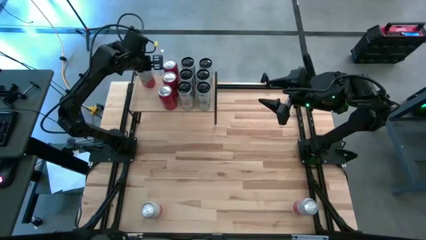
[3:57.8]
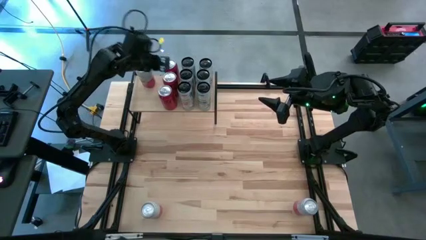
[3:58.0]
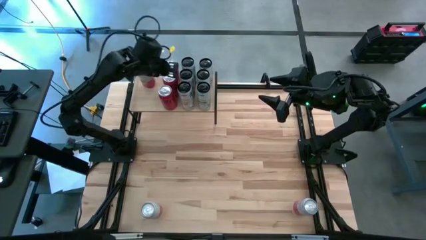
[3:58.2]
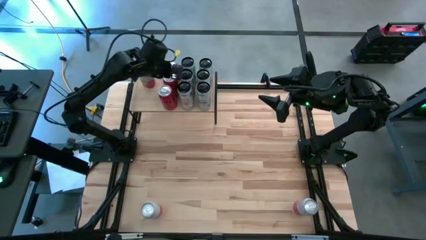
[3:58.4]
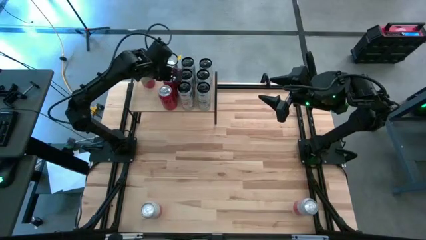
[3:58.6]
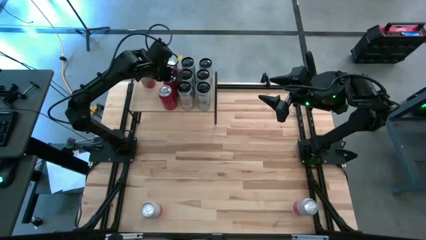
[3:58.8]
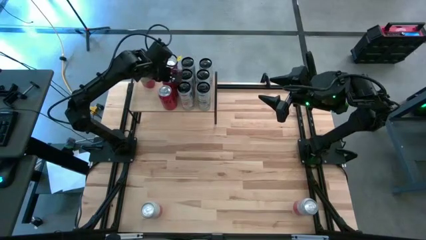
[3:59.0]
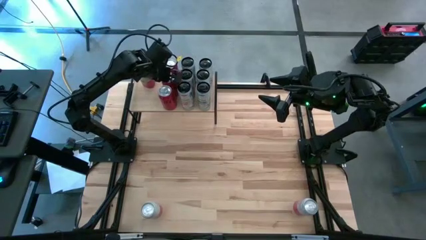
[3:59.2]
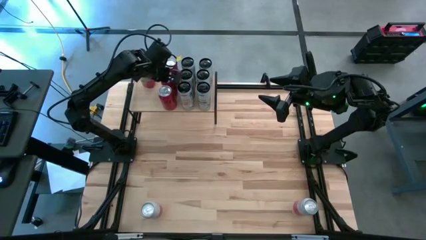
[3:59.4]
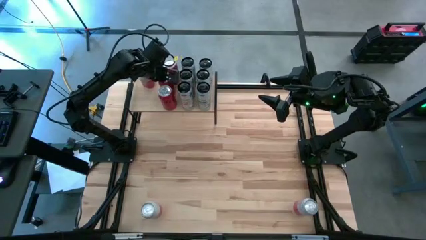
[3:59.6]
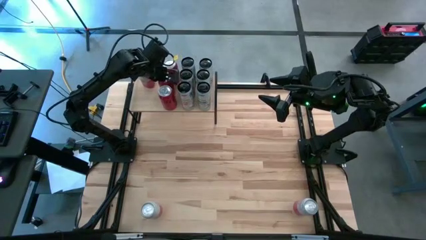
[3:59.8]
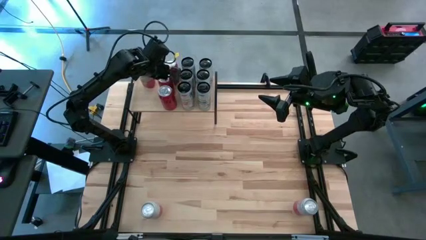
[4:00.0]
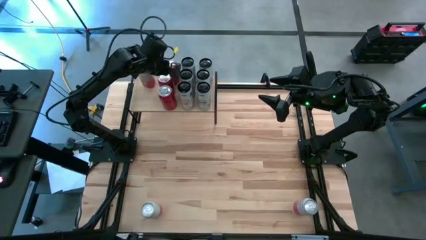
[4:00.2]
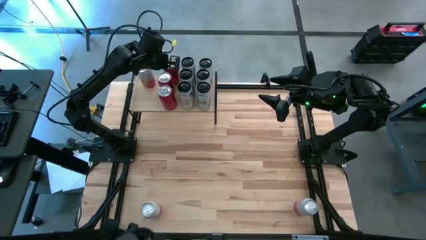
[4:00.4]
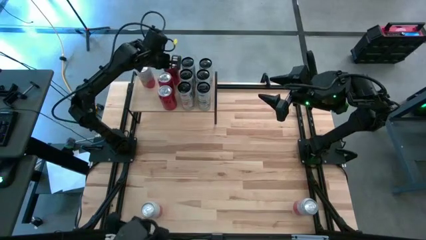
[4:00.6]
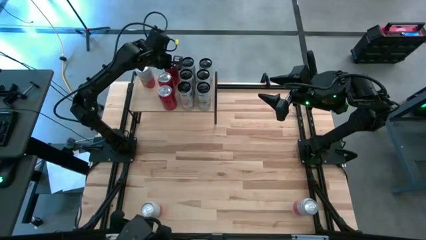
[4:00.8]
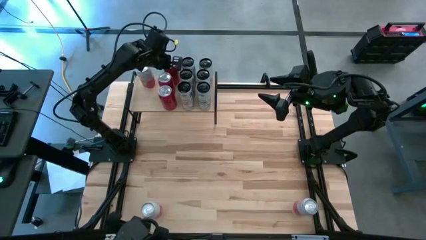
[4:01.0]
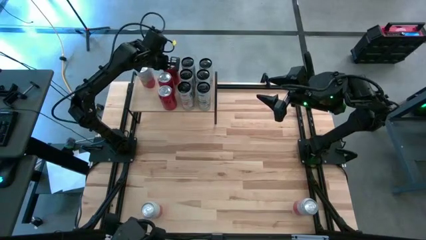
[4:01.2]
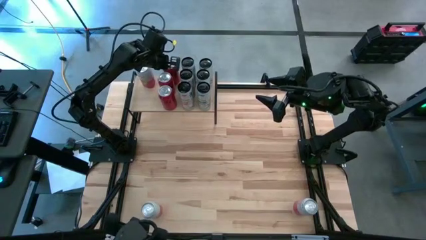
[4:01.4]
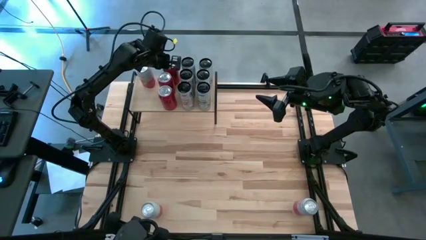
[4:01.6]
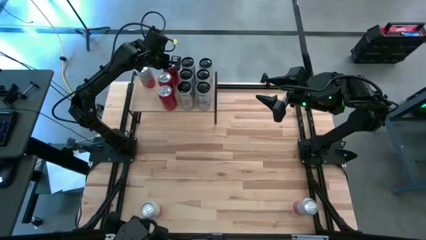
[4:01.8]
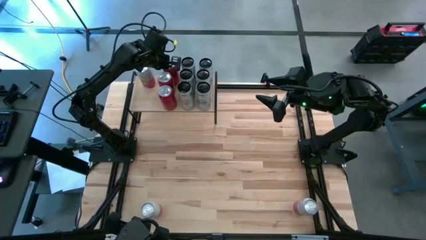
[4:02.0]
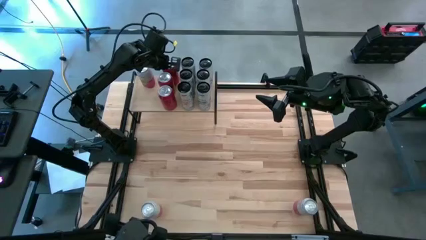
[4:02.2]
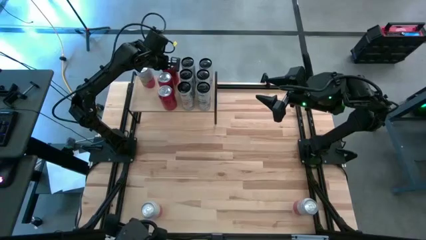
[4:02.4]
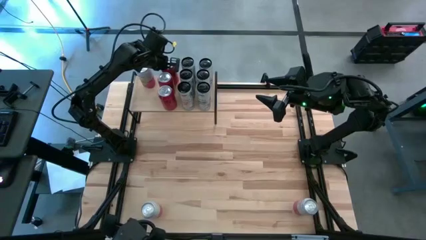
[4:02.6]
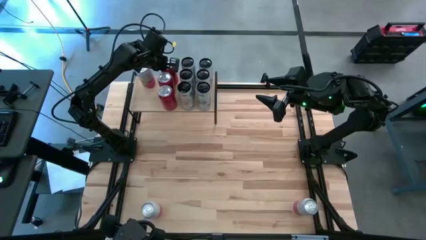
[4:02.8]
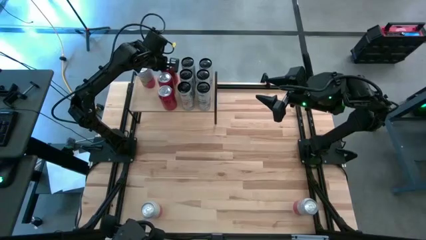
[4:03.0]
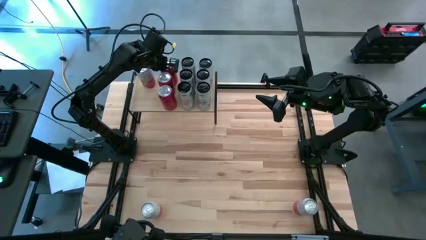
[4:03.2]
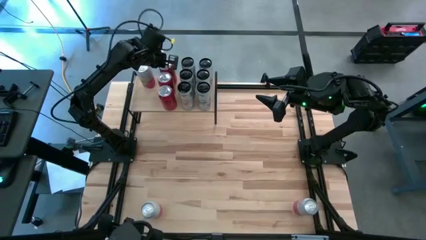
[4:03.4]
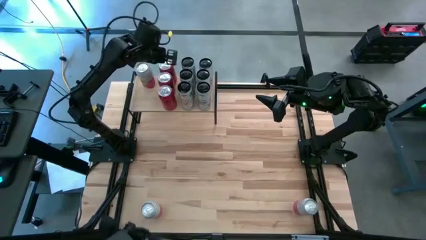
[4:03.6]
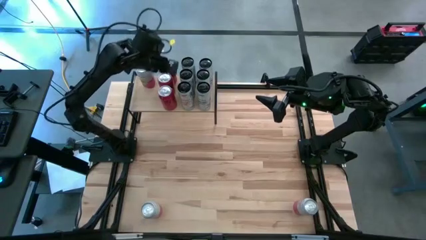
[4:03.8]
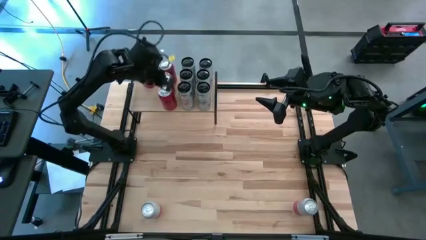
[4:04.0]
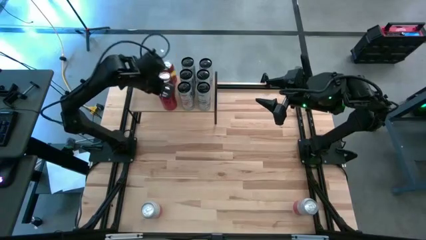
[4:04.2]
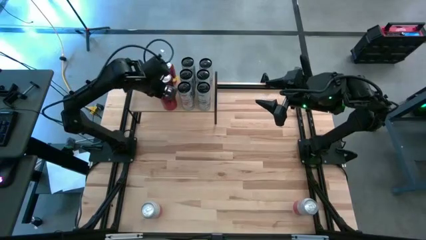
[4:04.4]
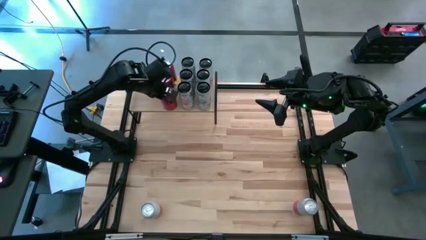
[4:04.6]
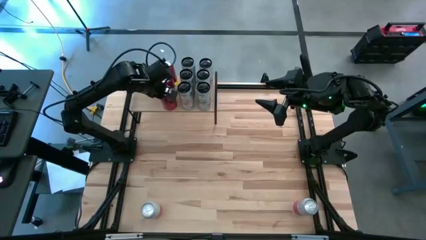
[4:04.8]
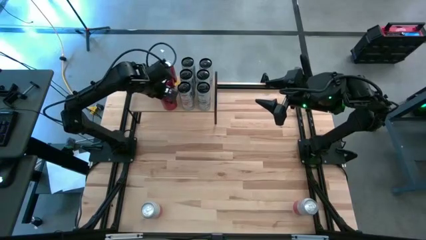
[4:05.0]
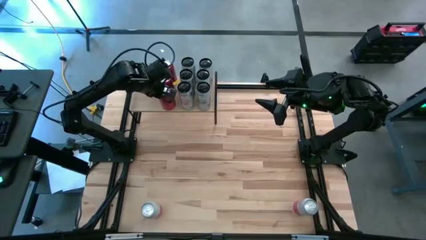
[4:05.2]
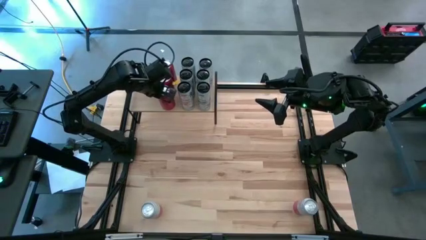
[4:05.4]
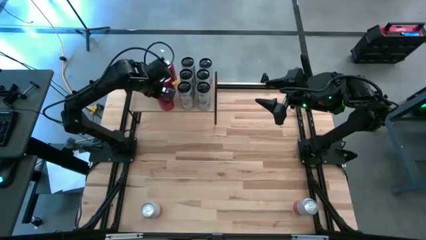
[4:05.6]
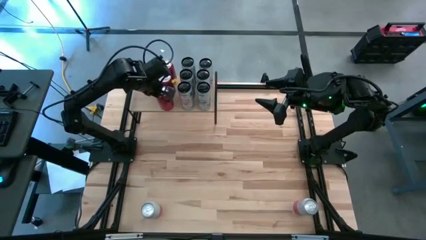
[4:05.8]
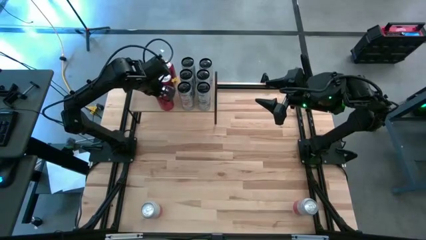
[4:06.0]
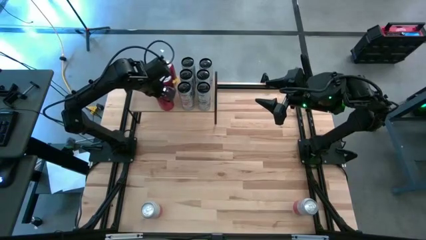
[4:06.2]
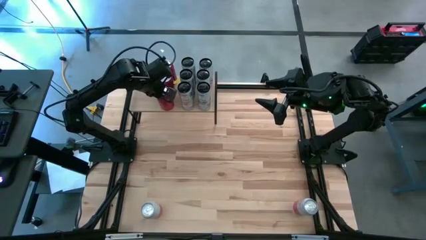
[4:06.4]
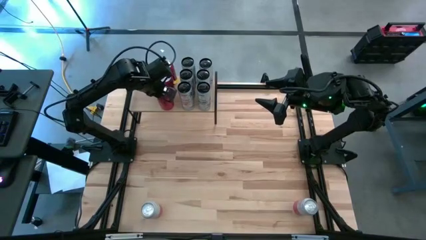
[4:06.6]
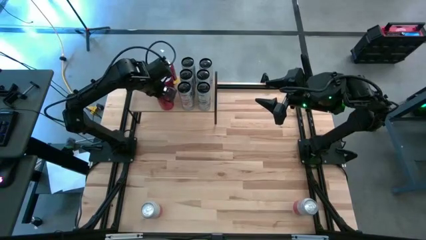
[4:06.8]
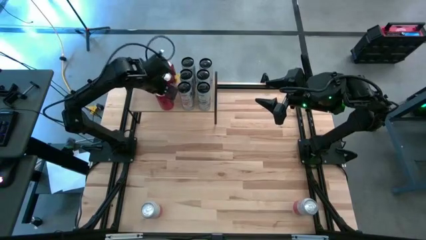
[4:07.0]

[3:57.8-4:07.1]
Task: Place canned beverage on shelf
Adjust the aligned red soda cans on the shelf

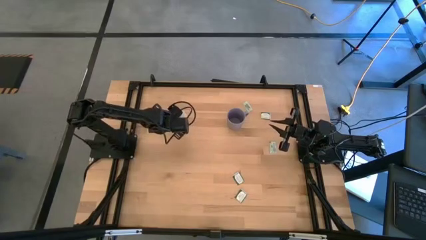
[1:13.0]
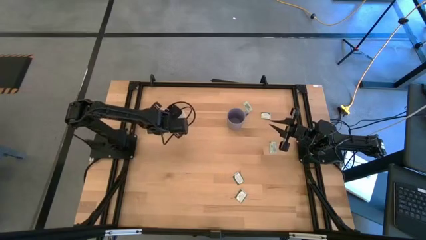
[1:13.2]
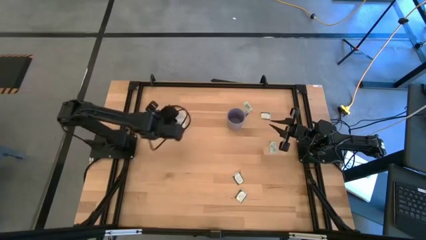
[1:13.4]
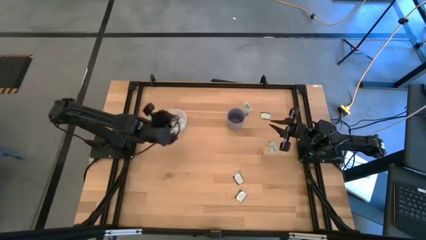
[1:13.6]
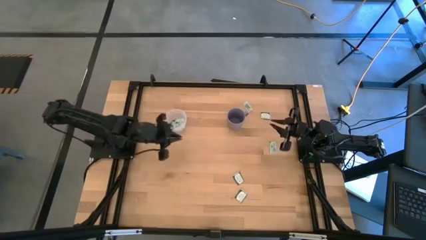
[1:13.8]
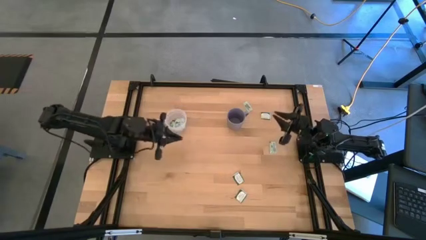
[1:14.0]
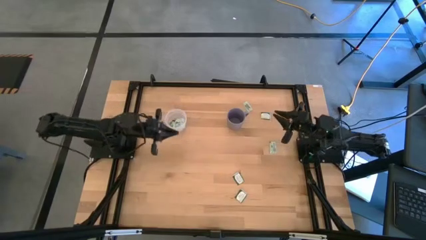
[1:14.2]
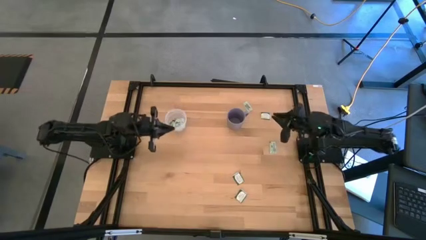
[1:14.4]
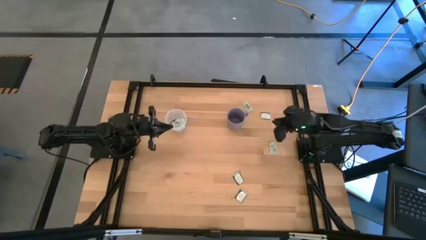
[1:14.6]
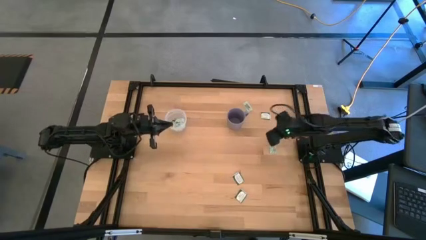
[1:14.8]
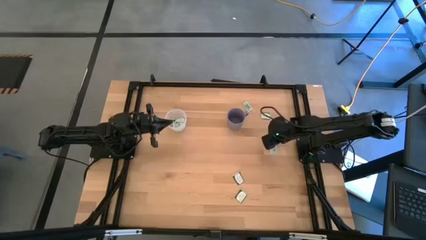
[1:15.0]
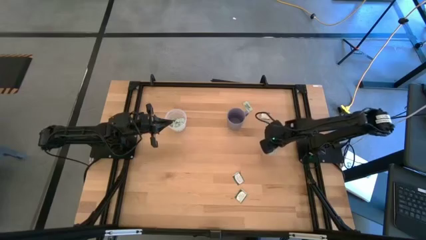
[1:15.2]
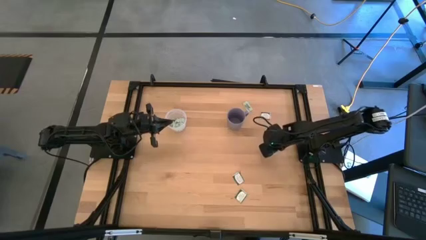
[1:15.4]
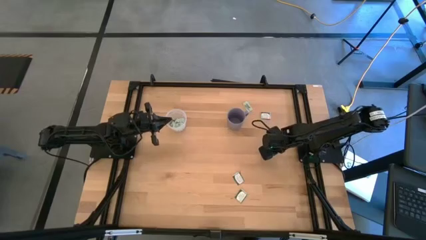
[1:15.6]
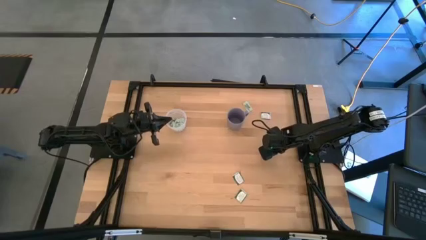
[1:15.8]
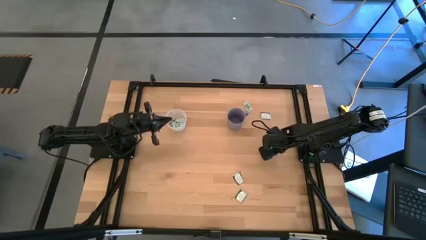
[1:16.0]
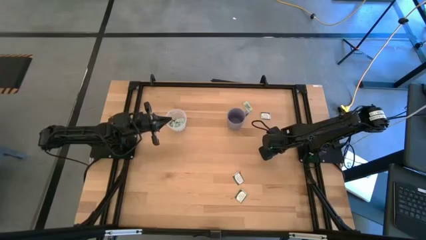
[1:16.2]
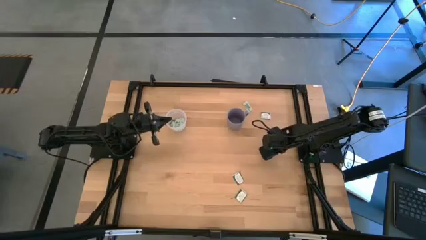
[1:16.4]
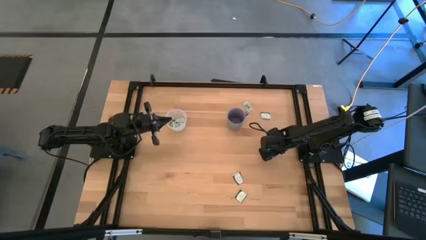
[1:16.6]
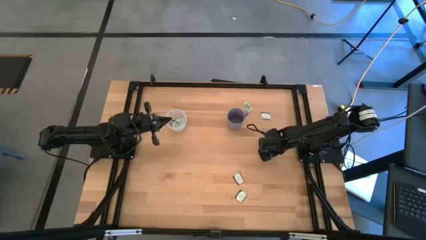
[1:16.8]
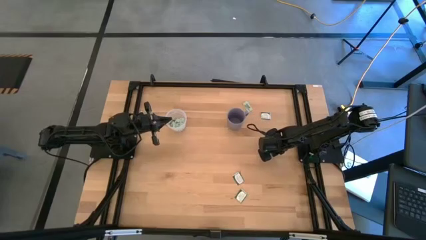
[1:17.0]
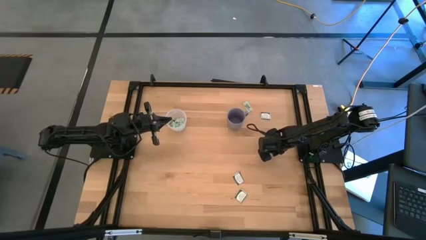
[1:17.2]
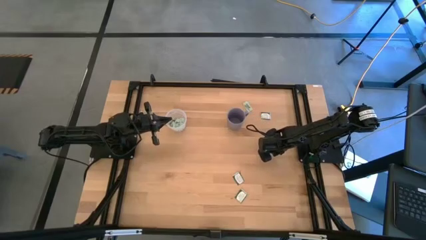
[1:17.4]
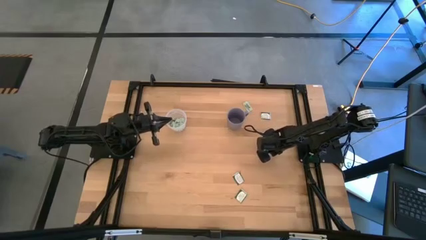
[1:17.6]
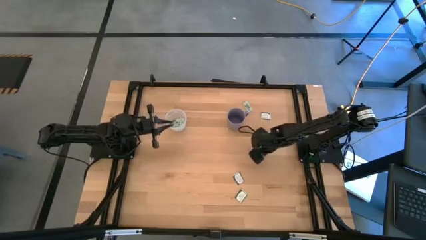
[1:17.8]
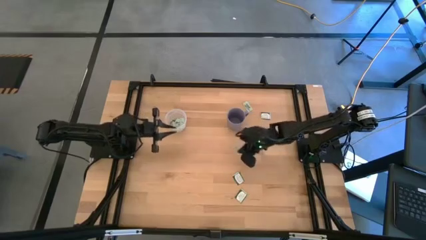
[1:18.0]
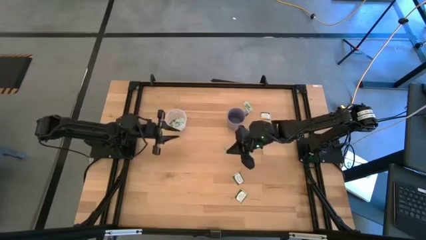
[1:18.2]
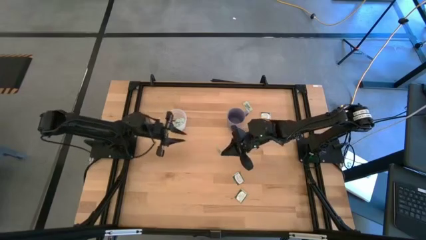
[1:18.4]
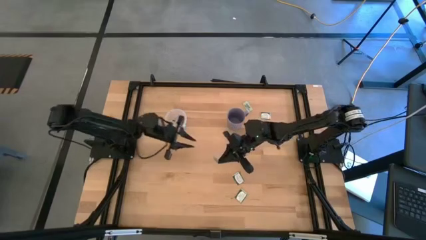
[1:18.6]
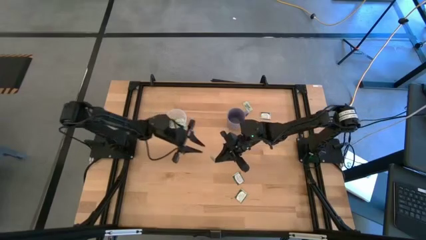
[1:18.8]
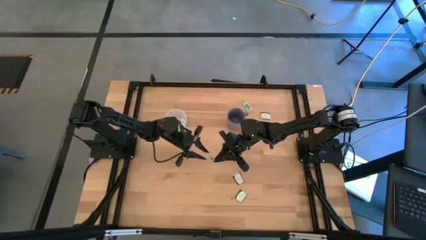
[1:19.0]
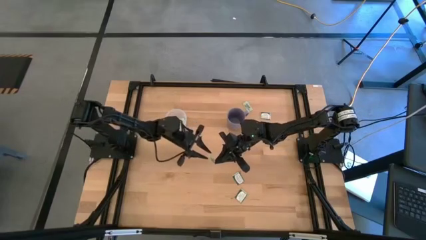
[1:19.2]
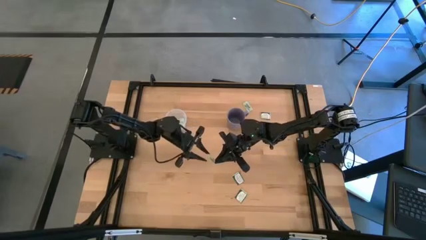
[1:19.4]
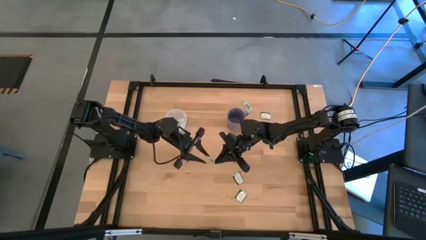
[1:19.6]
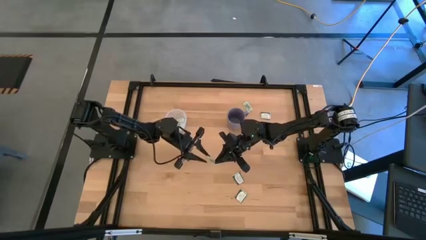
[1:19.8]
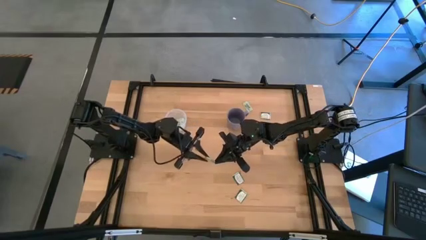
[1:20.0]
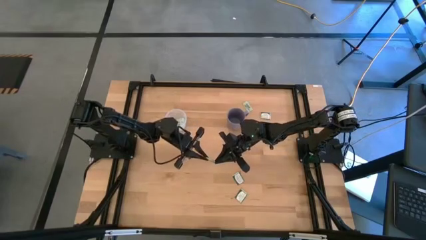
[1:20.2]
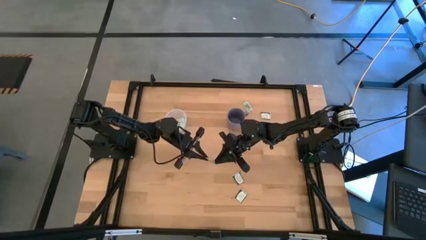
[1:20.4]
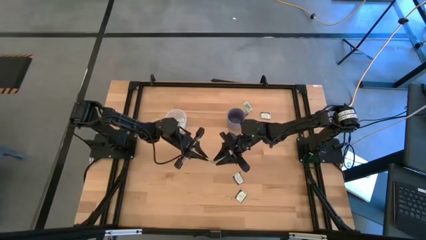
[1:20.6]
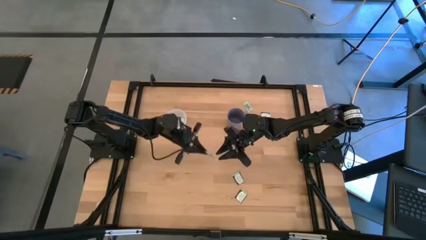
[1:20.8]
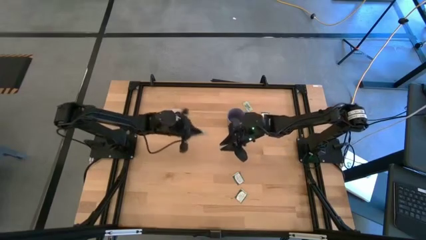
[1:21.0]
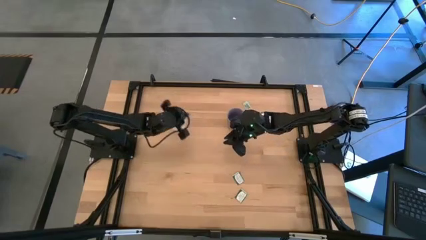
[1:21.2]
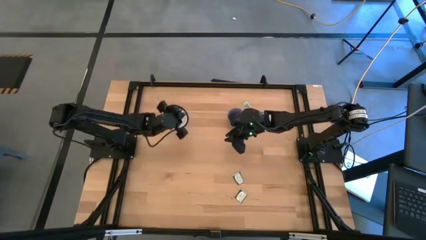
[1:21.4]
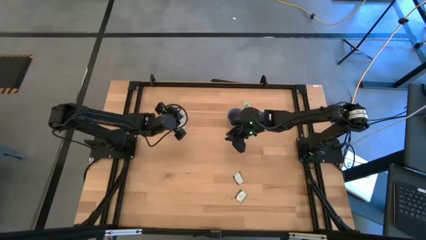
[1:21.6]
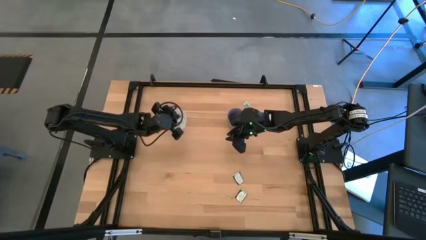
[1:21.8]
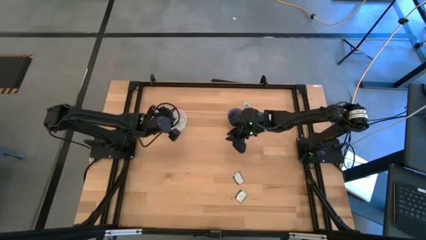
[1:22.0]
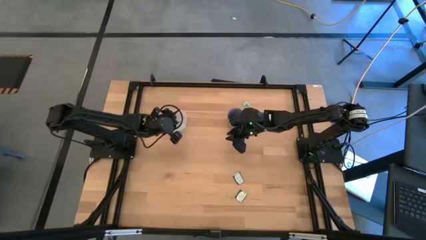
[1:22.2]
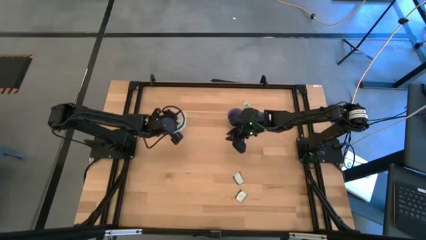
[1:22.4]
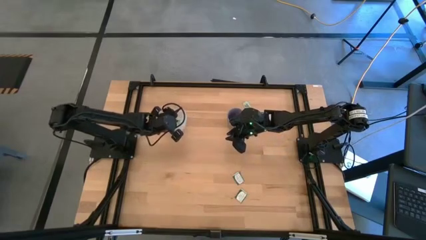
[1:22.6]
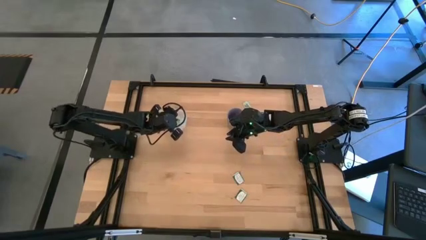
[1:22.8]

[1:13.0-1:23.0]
Task: Pick and place Stevia / Truvia into bins
Put the light green stevia packet into the transparent container
